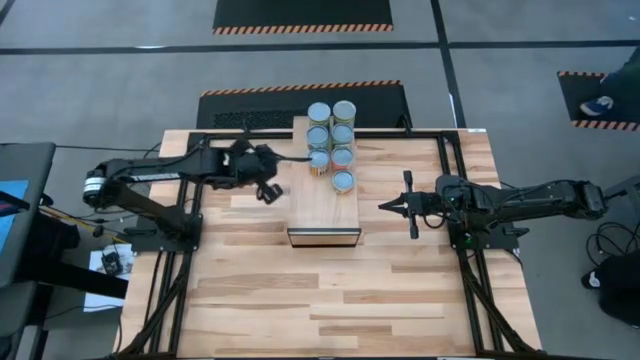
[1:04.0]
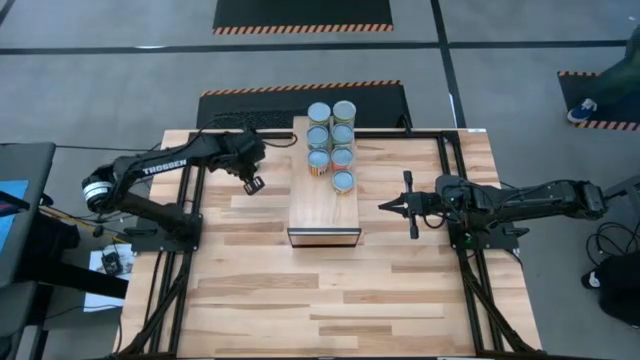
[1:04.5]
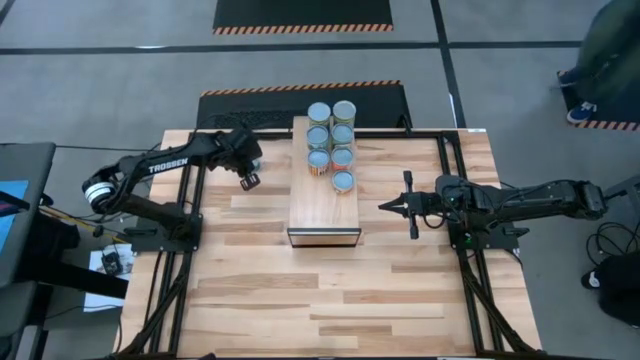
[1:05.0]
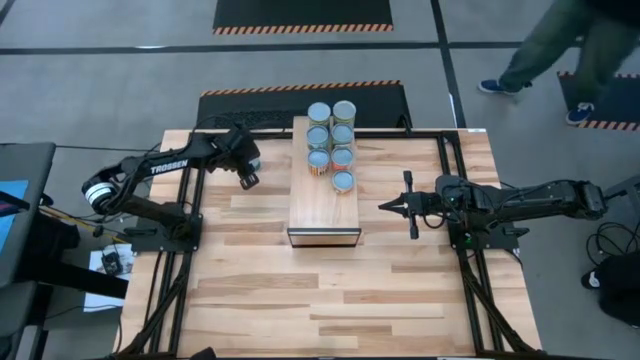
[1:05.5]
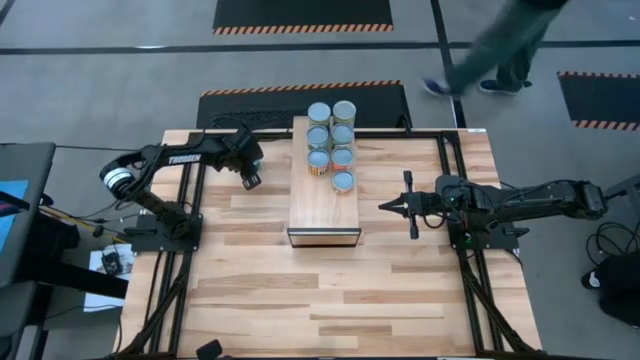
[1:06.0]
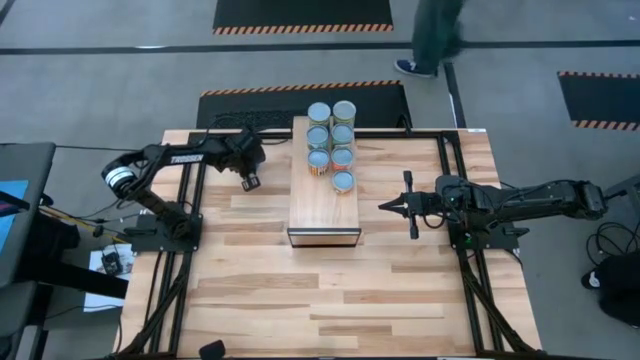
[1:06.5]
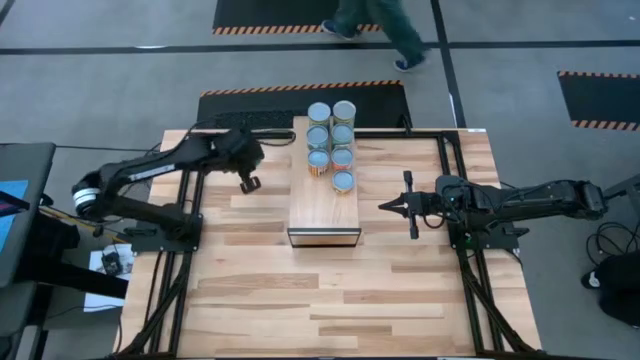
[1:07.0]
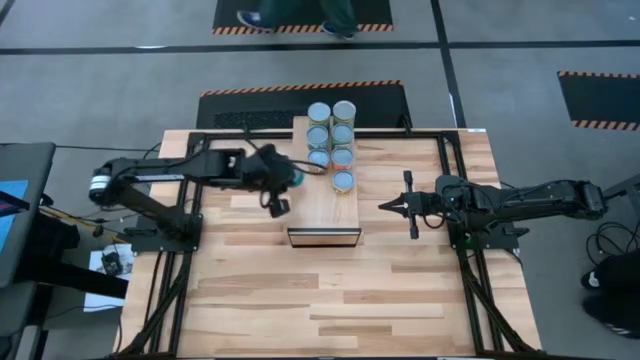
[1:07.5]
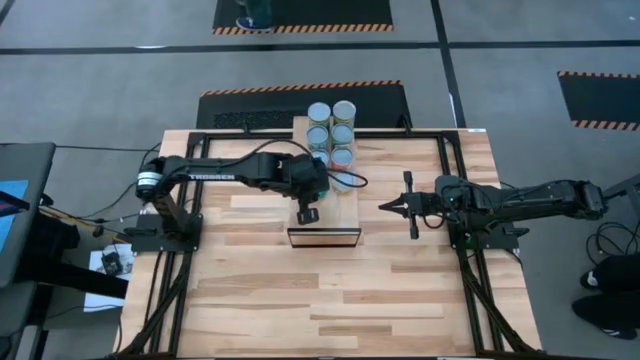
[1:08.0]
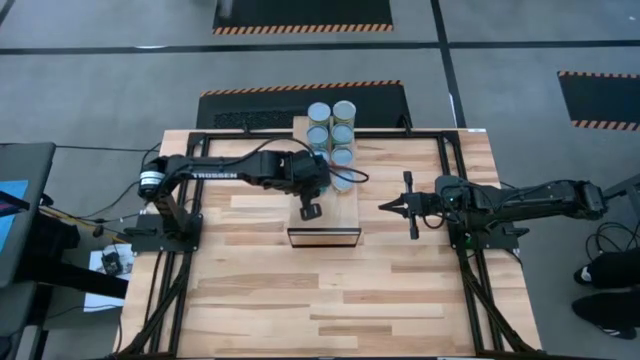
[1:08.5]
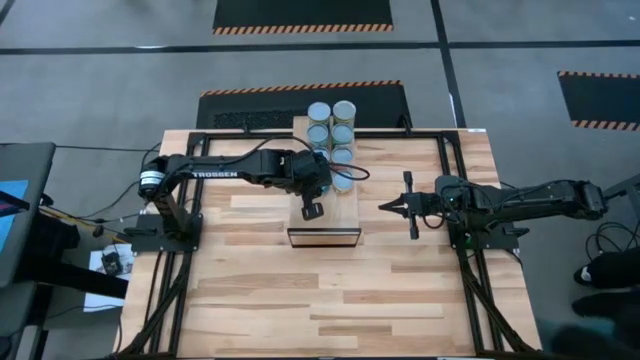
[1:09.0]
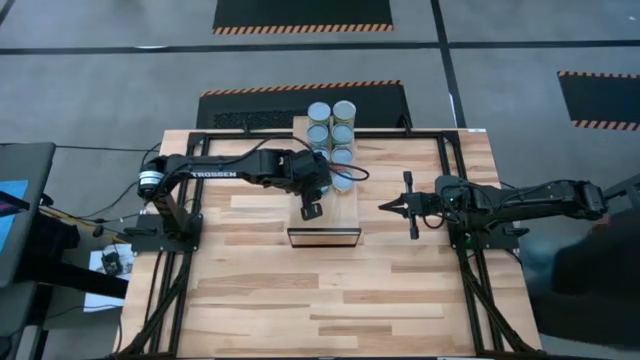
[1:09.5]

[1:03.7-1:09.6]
Task: Pick and place cans onto a shelf
Put the canned tuna on the shelf

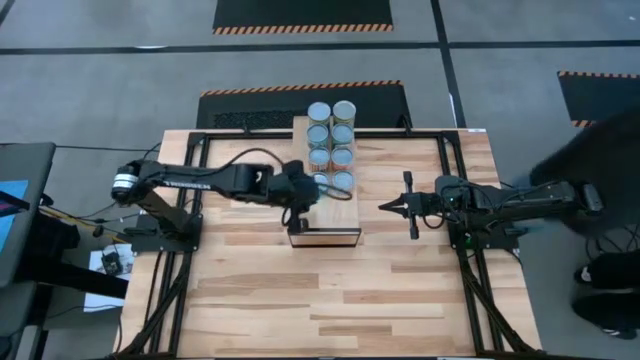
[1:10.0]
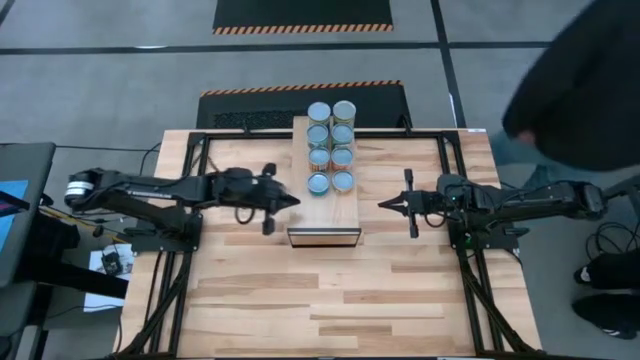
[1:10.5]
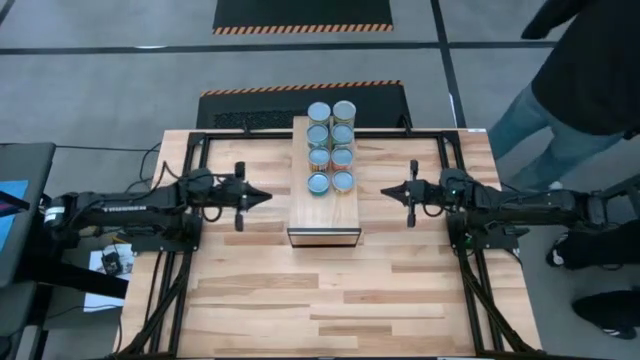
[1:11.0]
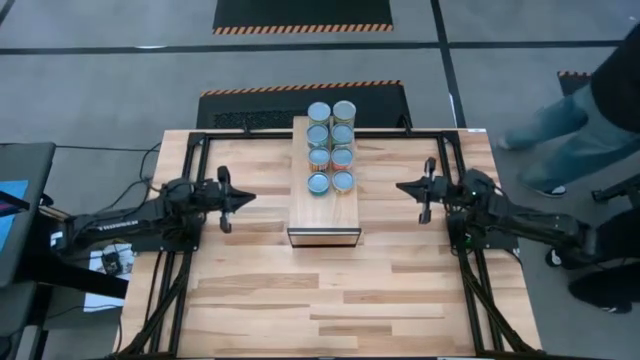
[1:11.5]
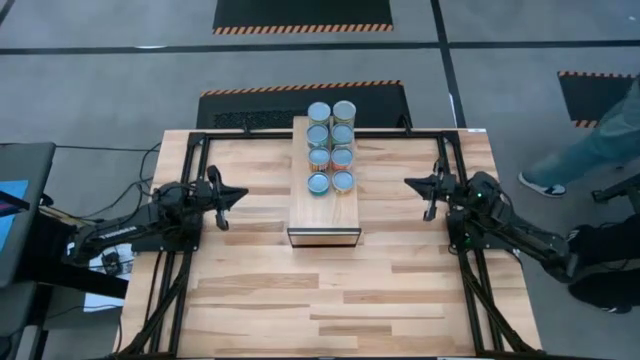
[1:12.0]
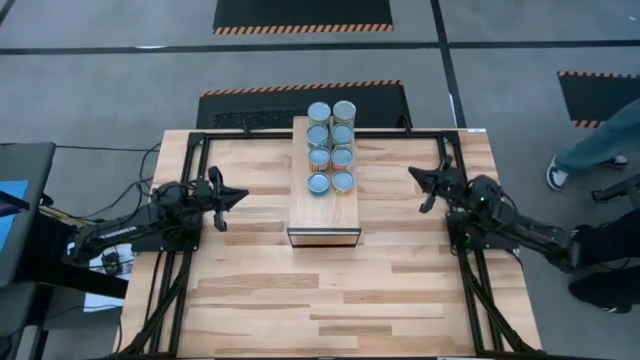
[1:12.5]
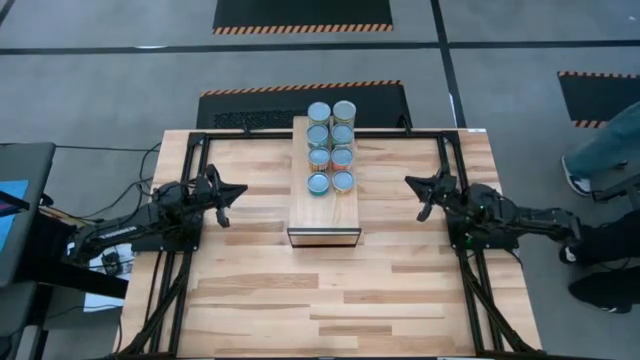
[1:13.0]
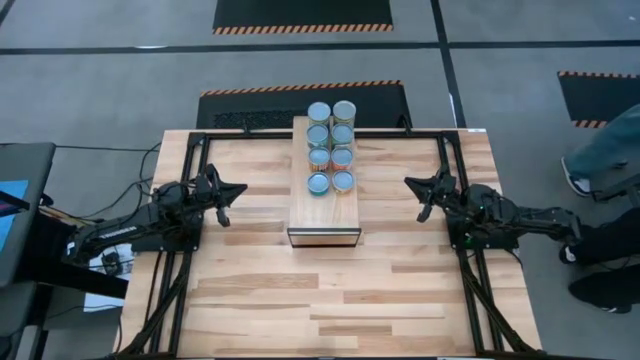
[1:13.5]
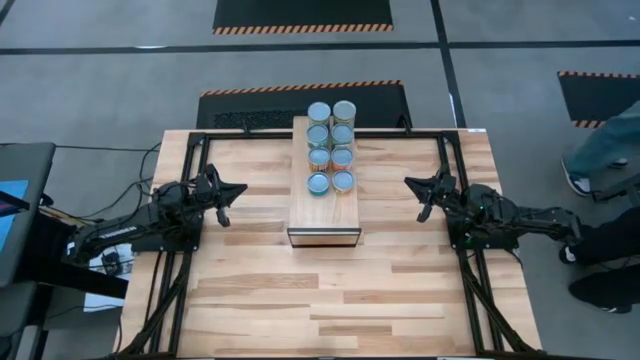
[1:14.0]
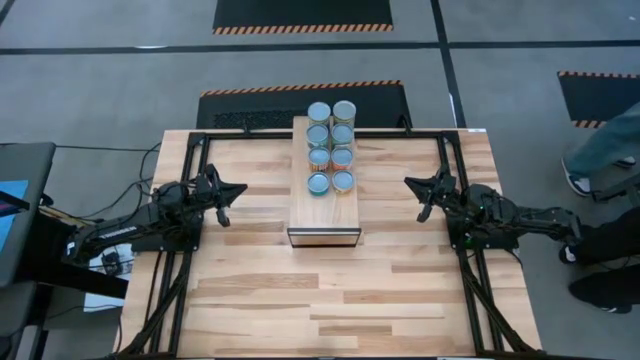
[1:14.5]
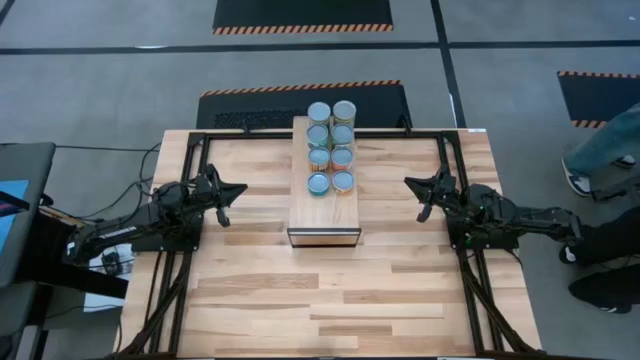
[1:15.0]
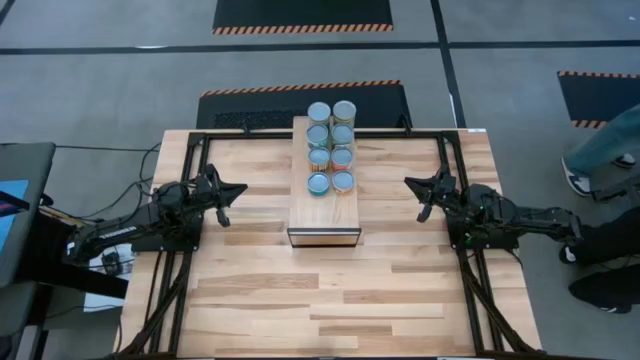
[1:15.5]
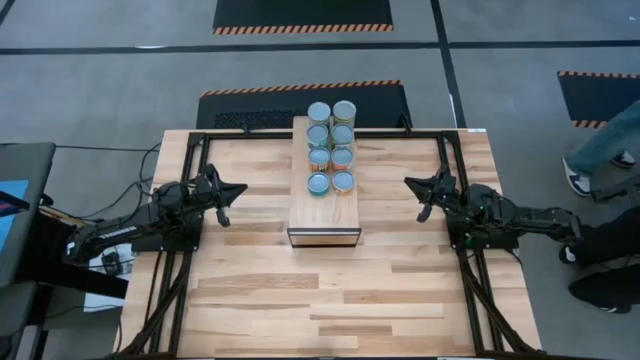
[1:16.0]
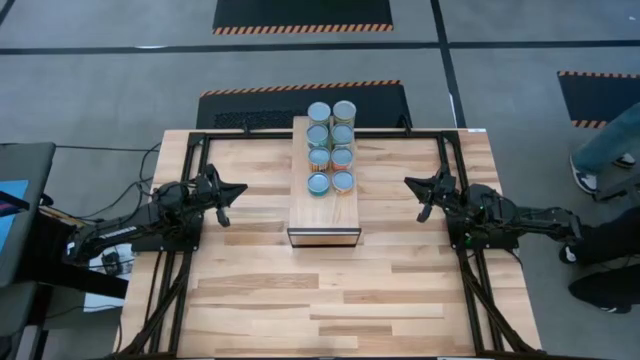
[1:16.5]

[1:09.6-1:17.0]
Return to Home Position

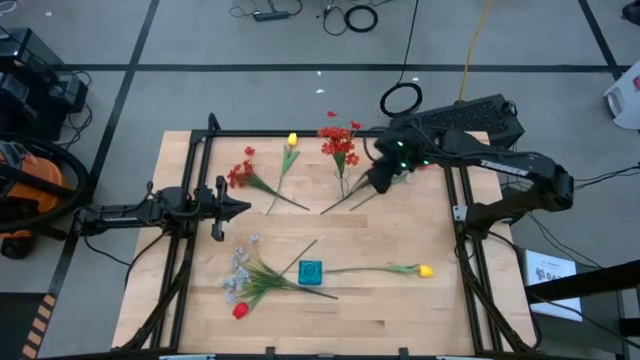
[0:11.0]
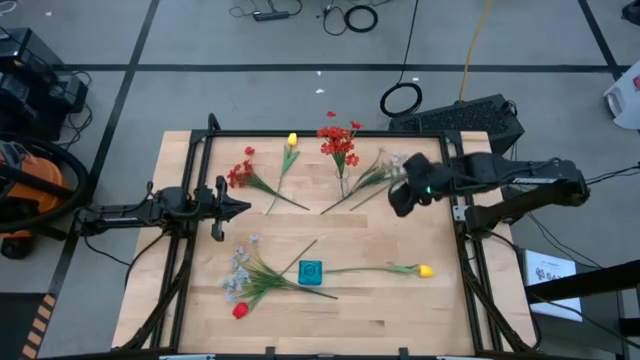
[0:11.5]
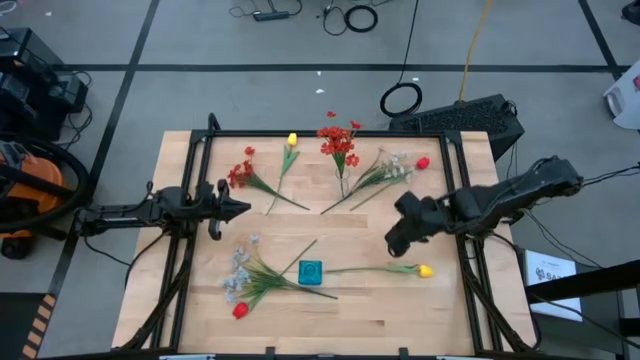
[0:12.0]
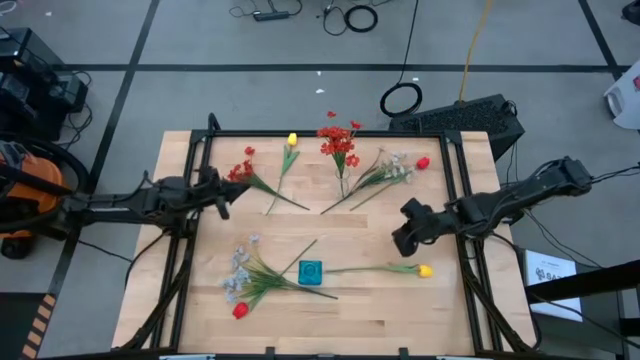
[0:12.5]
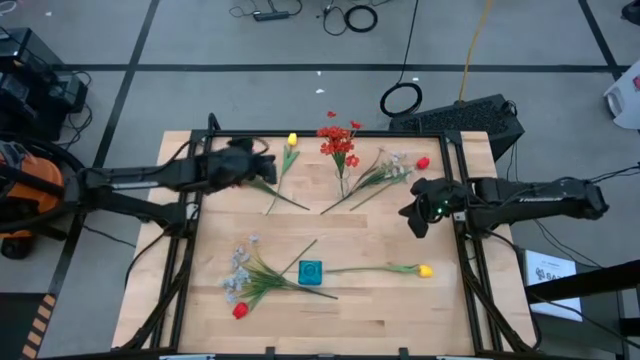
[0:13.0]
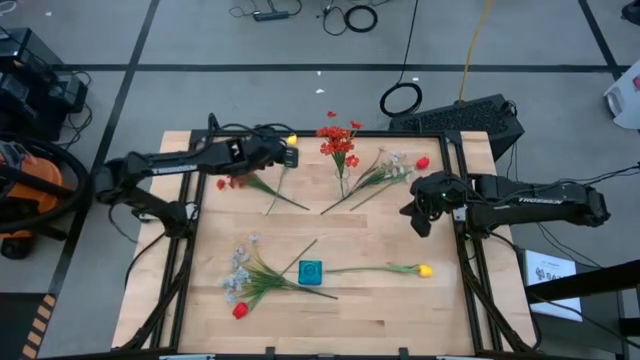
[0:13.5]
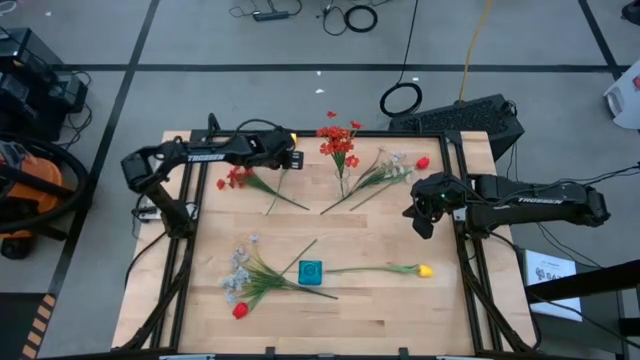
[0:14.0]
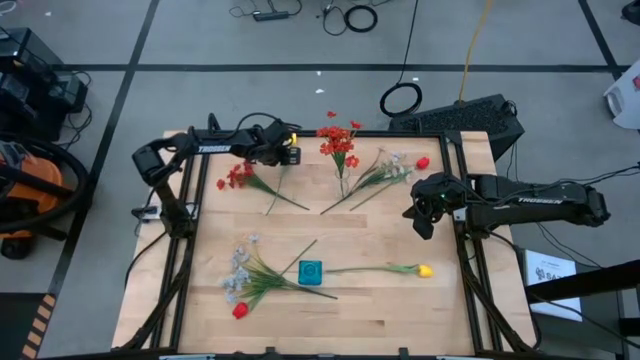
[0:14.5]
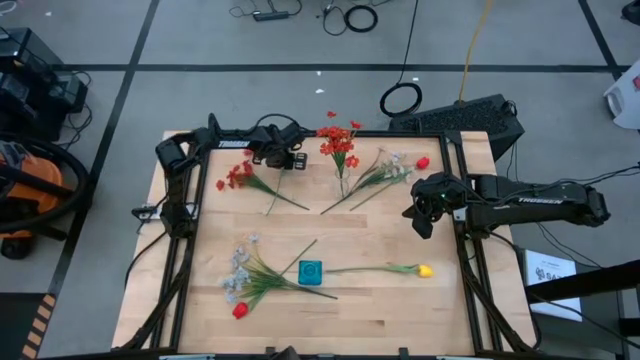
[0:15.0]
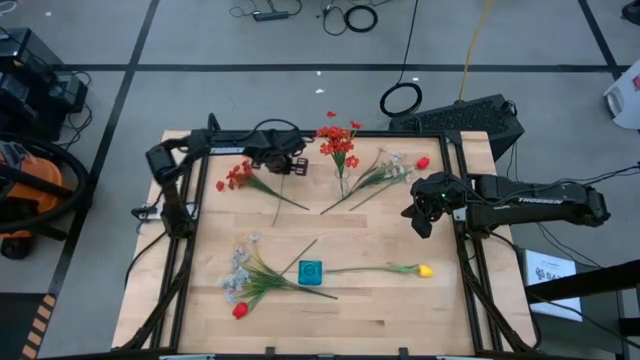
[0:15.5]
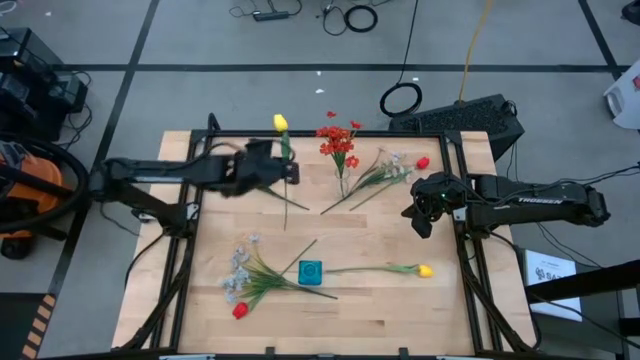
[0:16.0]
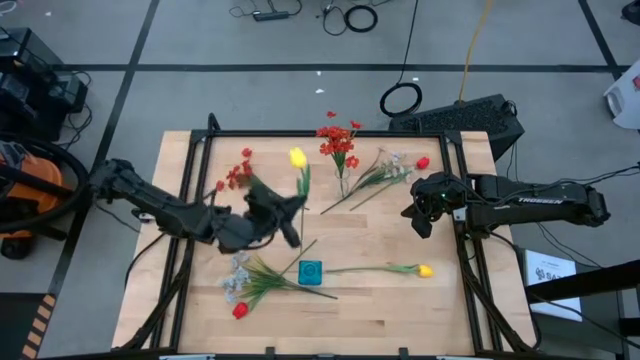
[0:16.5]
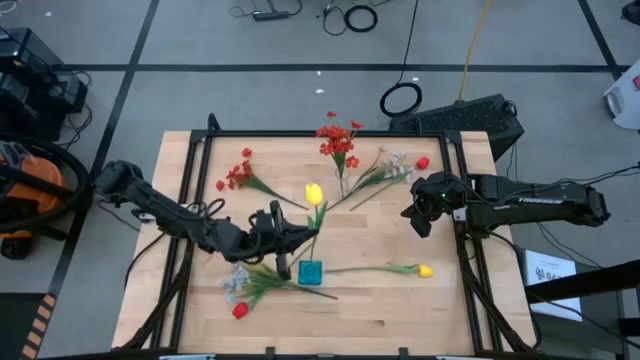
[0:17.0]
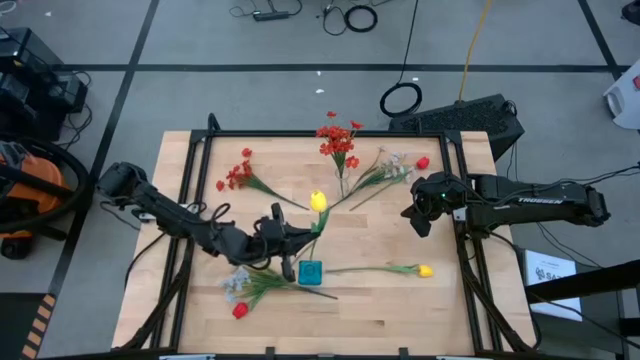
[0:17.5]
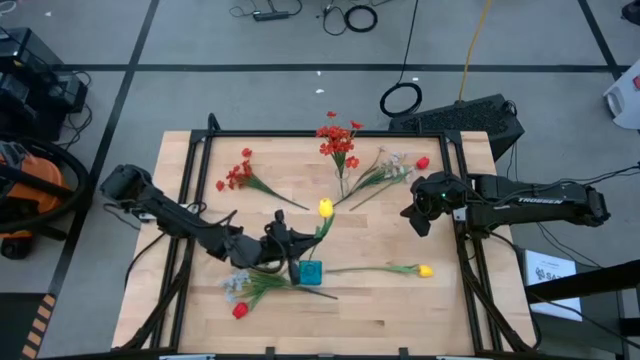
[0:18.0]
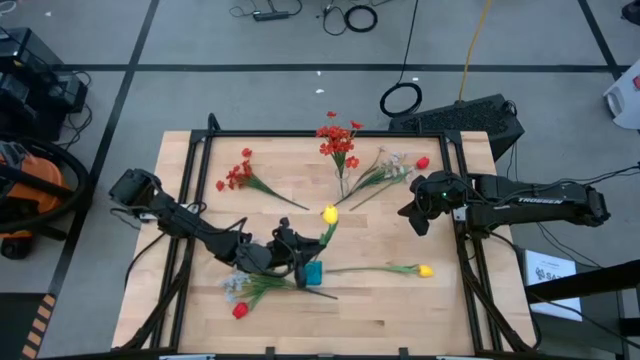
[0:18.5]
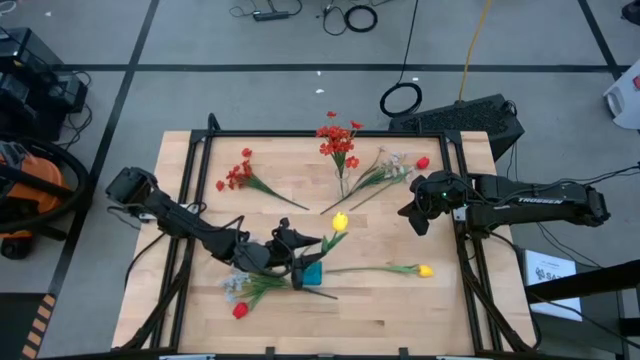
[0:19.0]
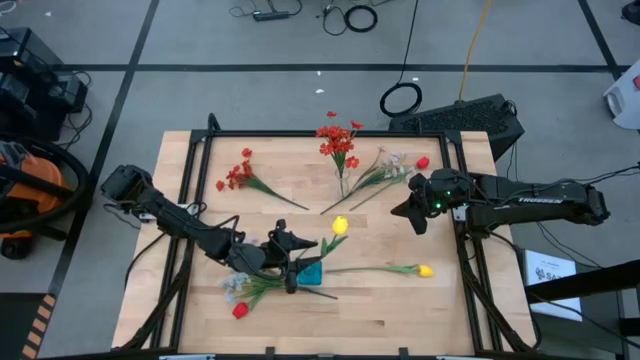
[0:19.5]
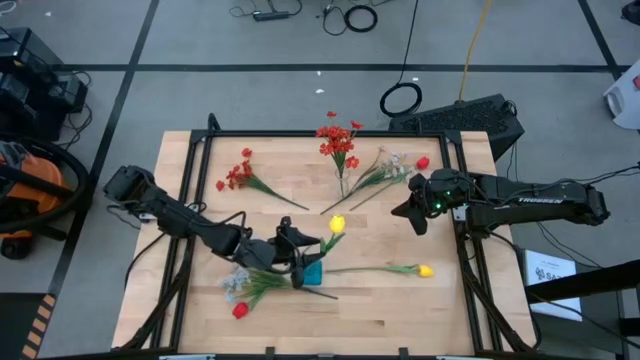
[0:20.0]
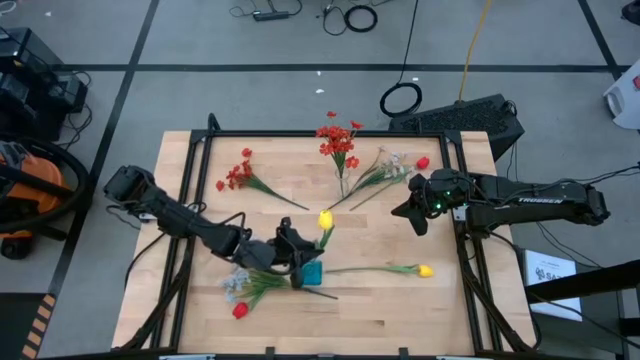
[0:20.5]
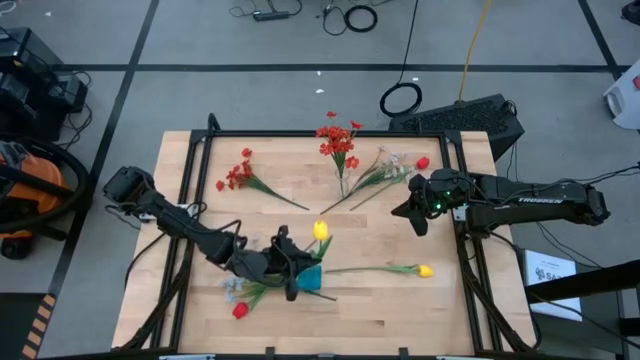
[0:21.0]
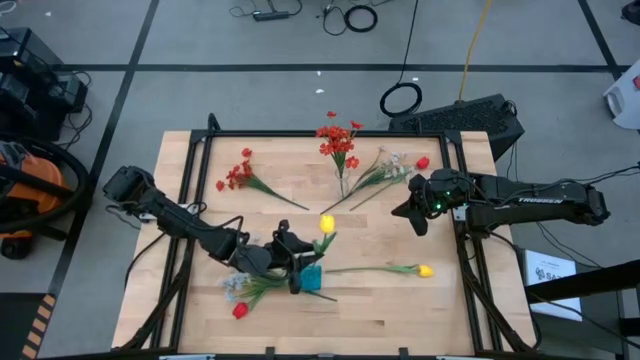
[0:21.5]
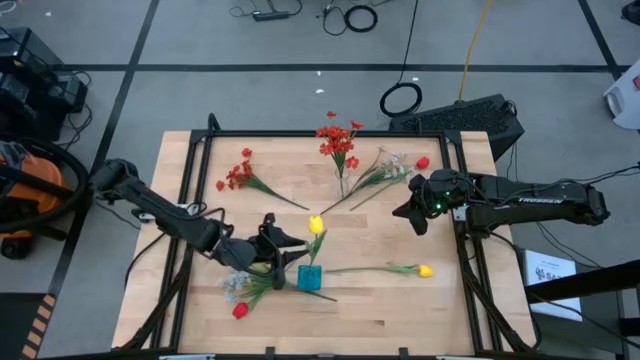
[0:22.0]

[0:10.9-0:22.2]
Task: Sort flowers into vase by color
Put the top yellow tulip into the blue flower vase
